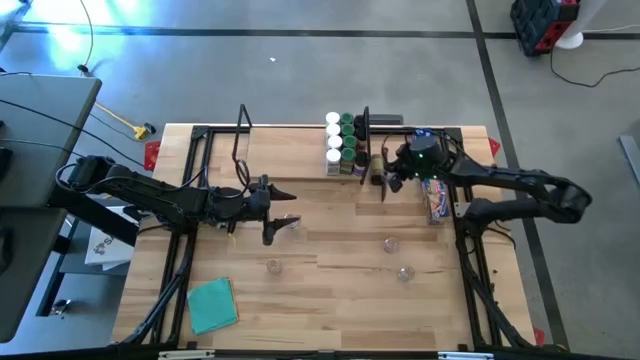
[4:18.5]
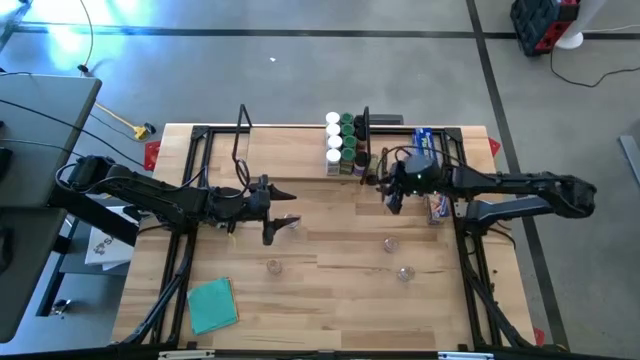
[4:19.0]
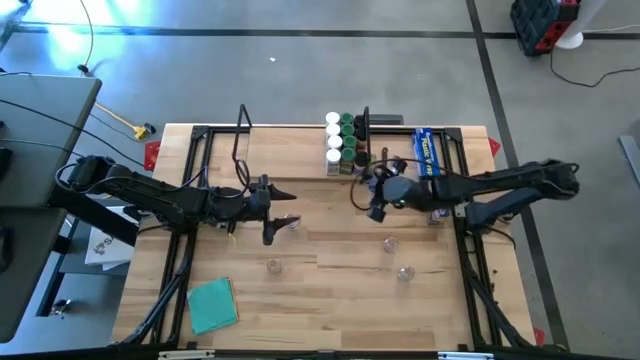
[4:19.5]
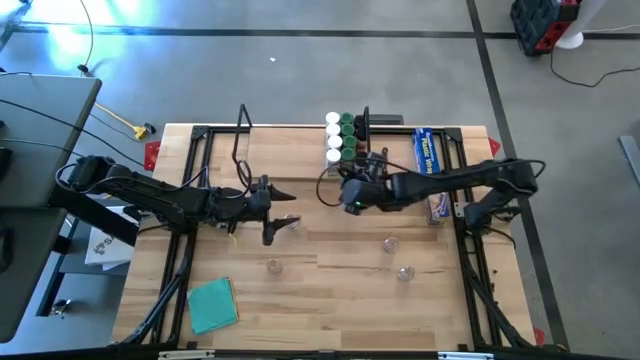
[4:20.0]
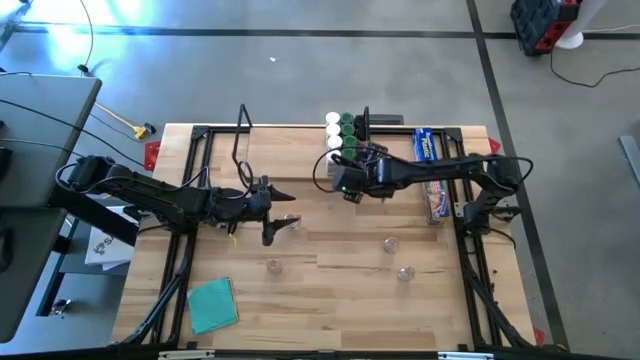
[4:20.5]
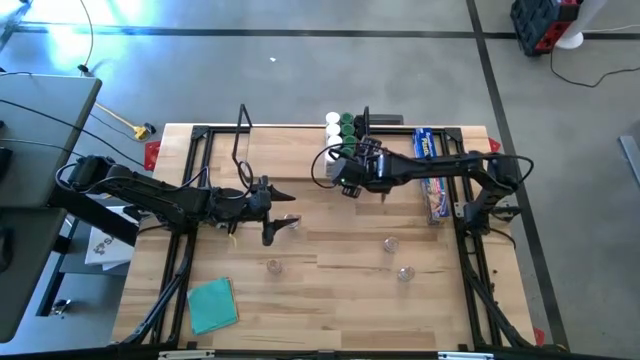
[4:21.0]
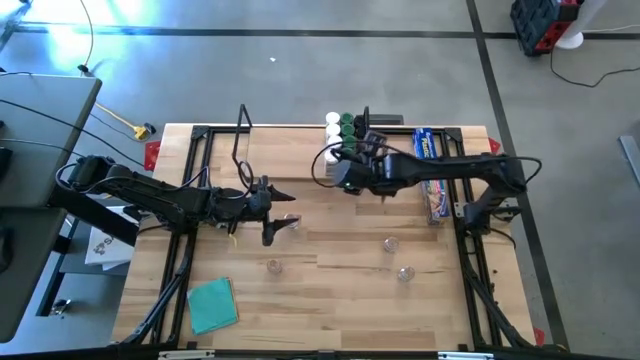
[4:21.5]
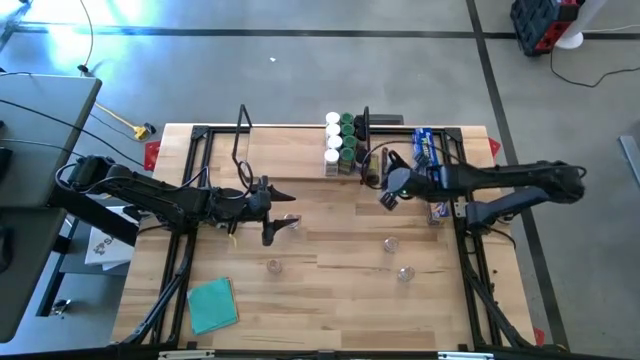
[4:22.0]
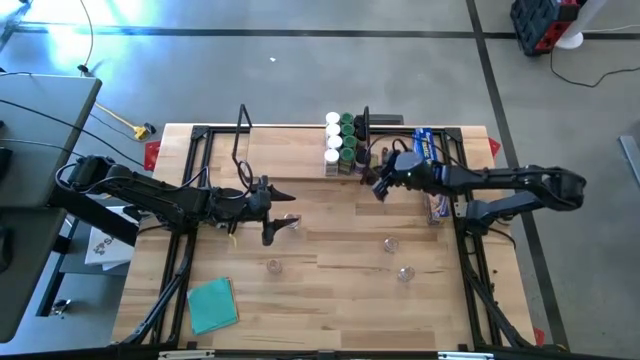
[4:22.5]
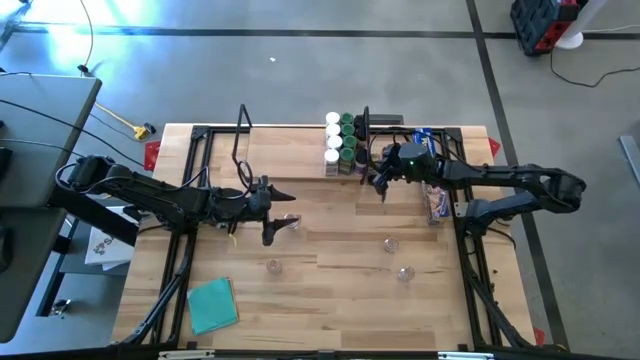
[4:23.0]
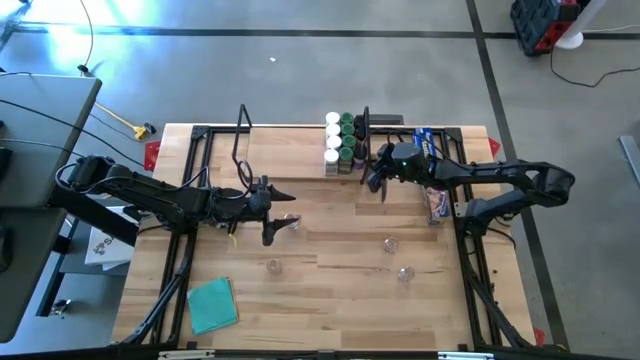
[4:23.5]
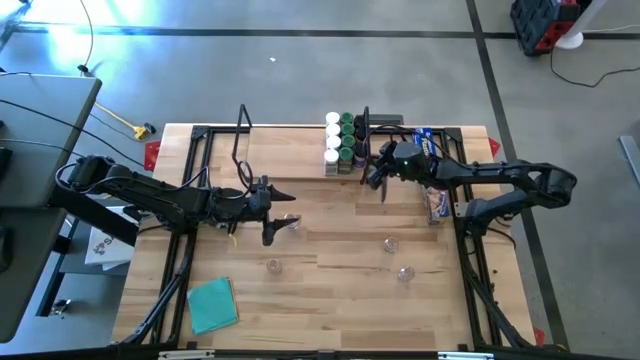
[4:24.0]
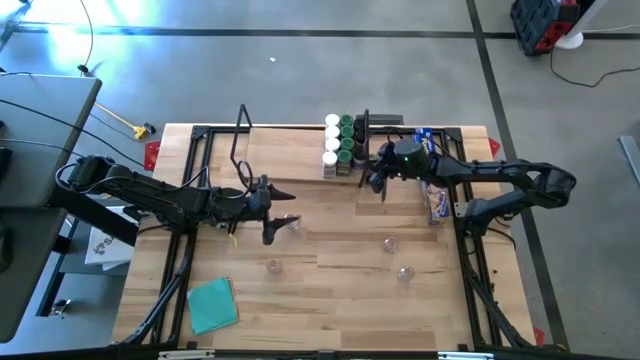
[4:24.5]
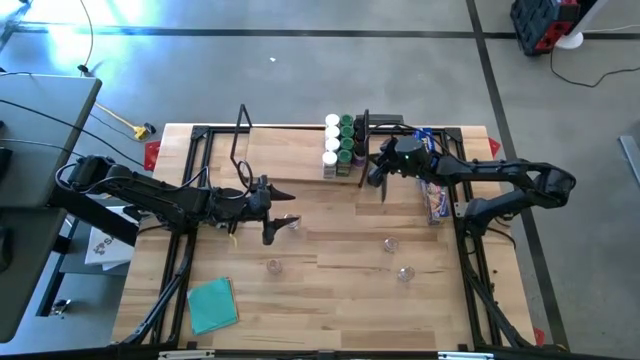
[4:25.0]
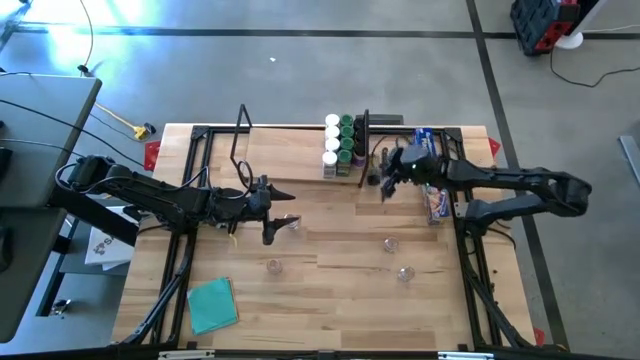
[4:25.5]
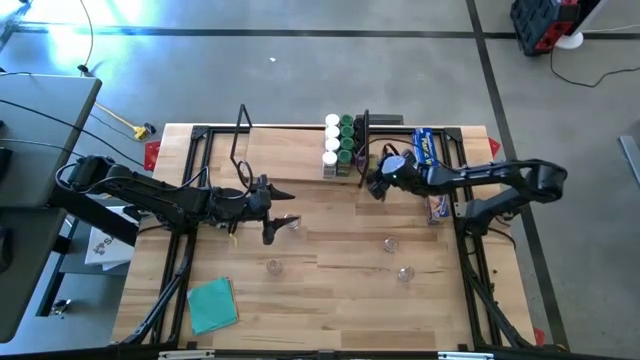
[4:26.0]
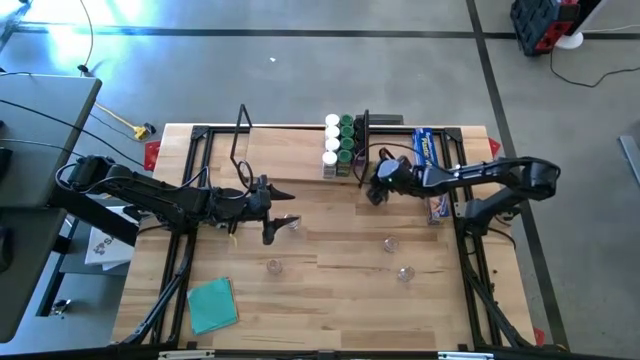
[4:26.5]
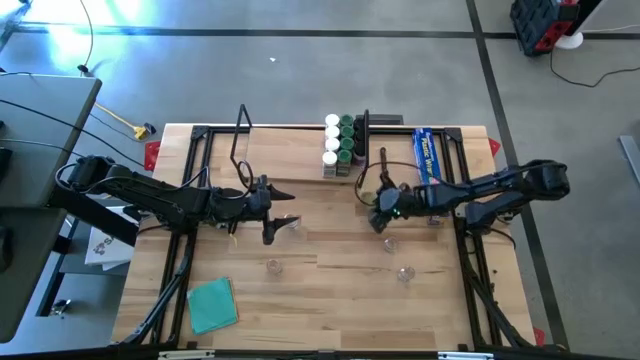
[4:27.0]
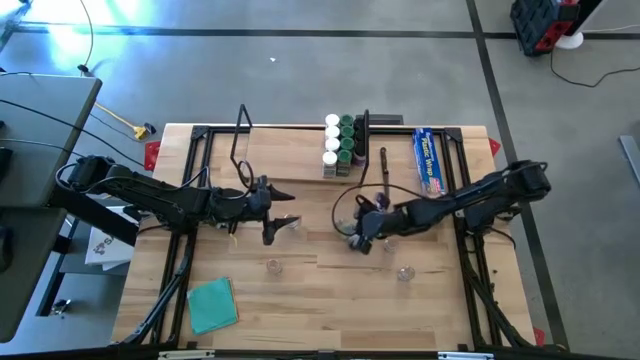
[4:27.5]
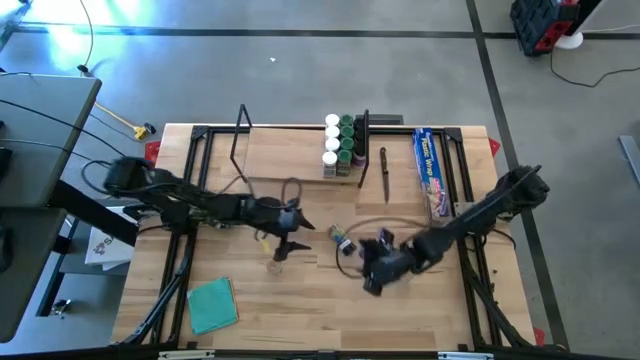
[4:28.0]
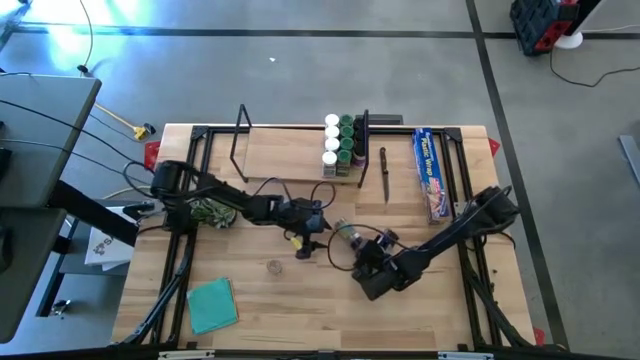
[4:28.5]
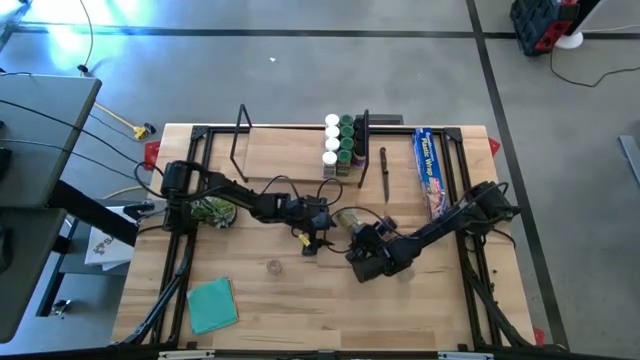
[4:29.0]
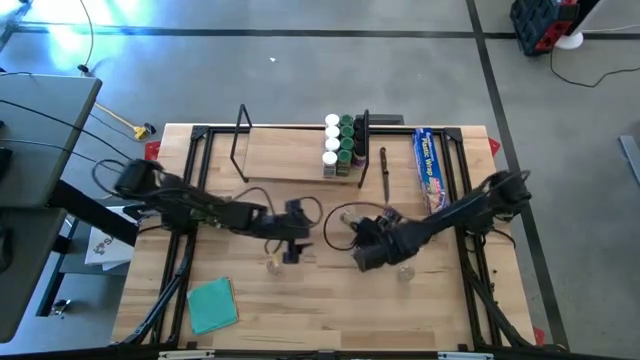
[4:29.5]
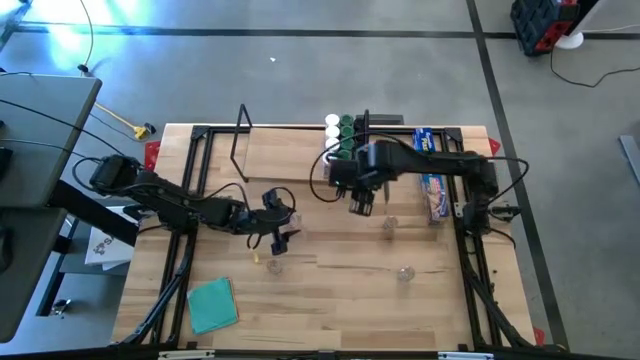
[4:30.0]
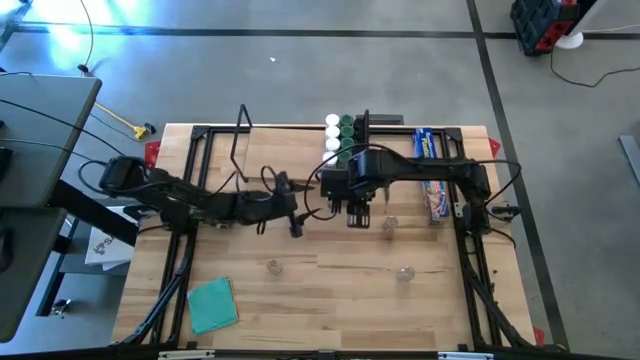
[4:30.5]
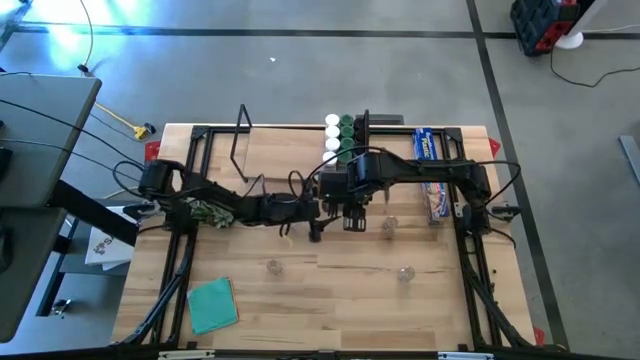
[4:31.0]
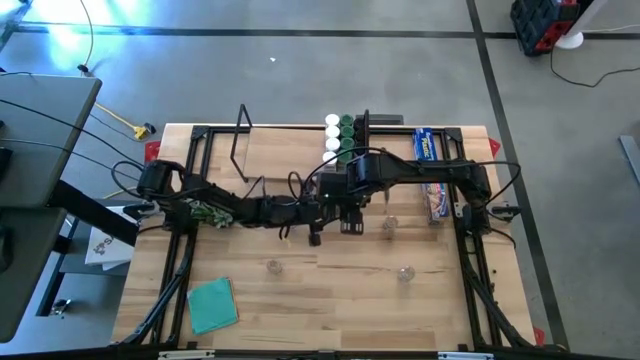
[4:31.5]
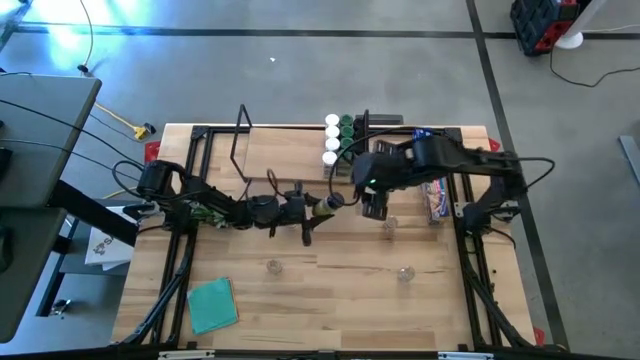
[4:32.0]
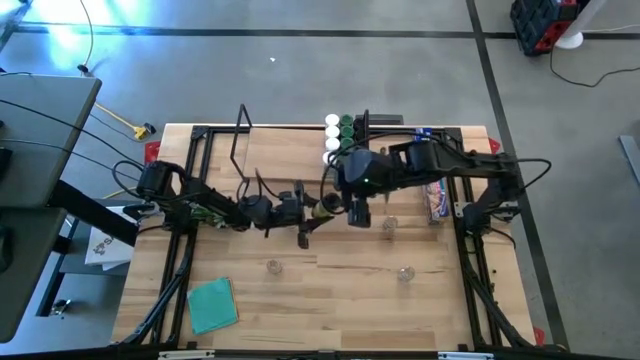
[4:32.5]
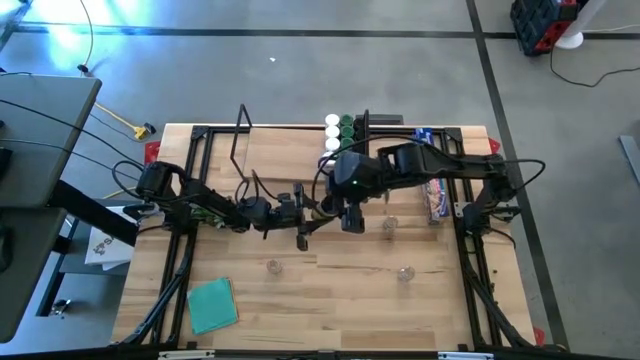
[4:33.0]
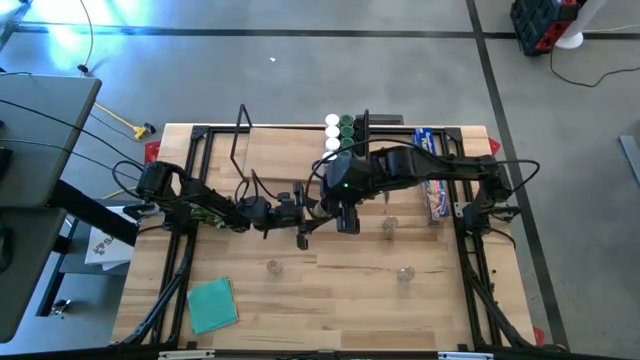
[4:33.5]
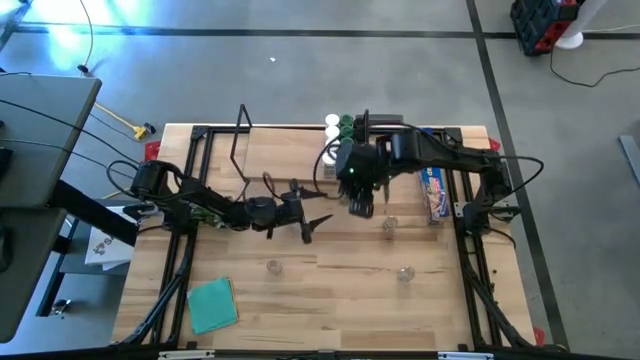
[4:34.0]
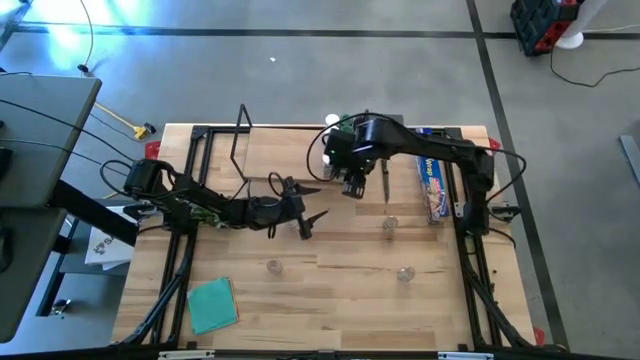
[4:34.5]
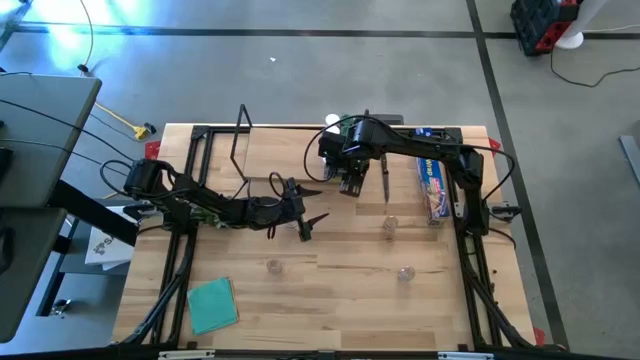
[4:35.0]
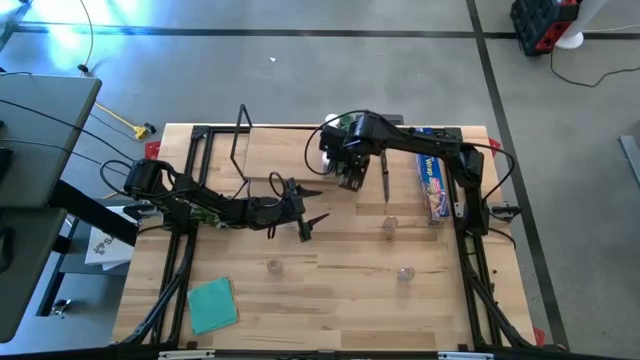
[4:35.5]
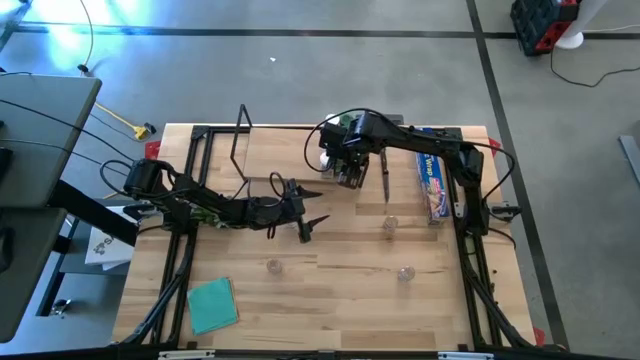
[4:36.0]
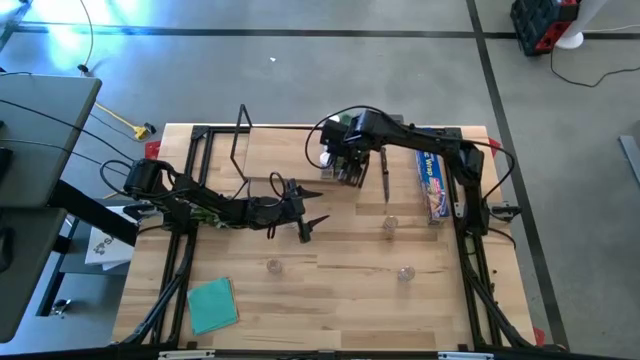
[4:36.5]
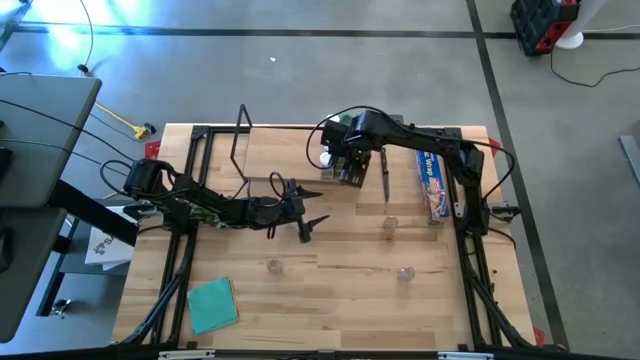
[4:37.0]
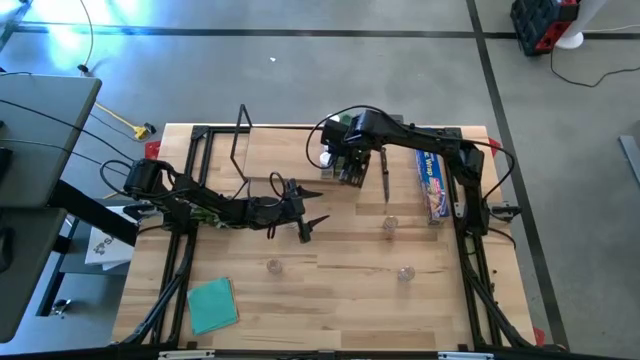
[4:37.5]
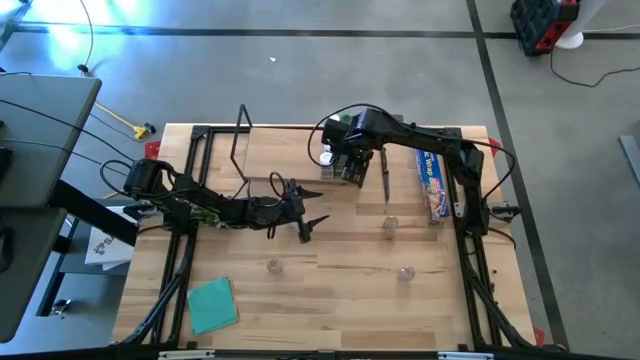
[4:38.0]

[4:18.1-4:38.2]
Task: Shelf spices
Adjust the black seasoning bottles on the shelf
